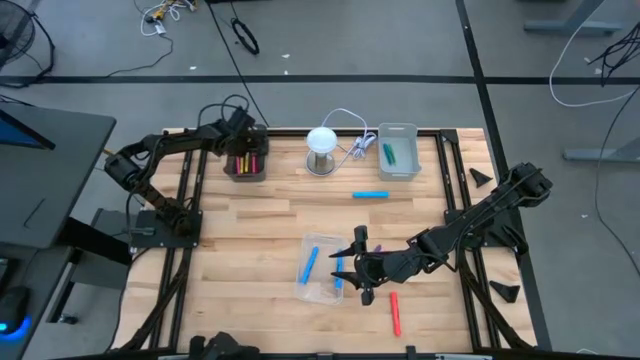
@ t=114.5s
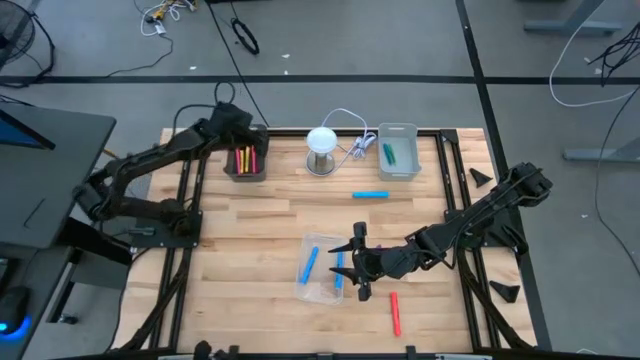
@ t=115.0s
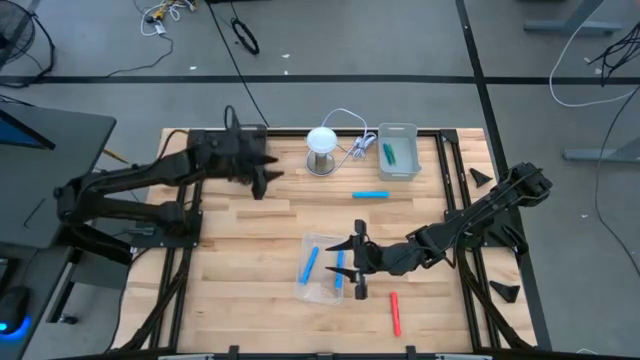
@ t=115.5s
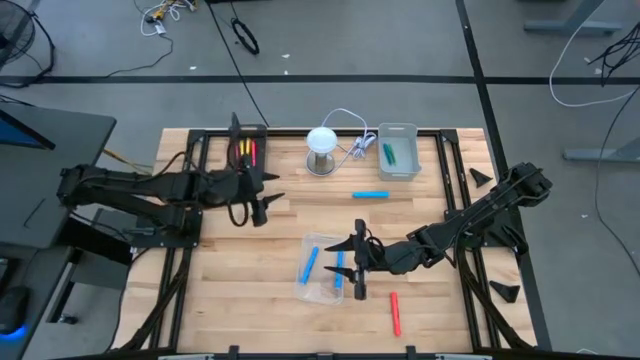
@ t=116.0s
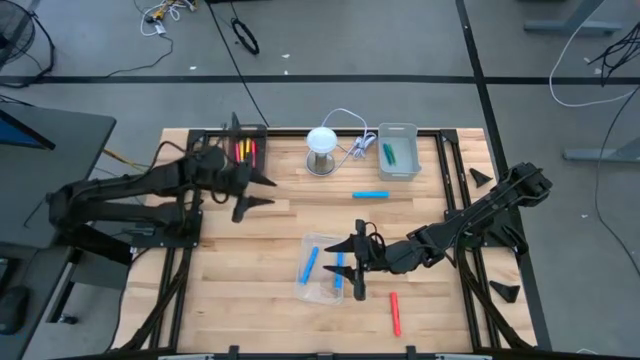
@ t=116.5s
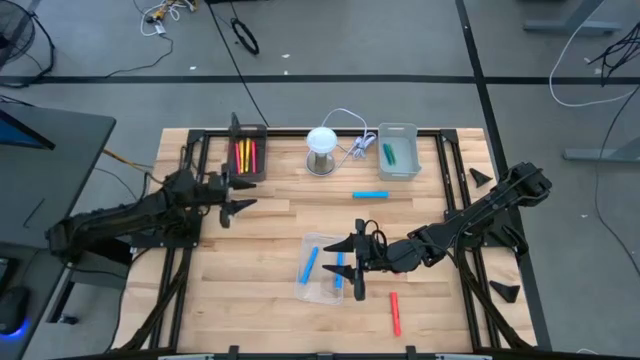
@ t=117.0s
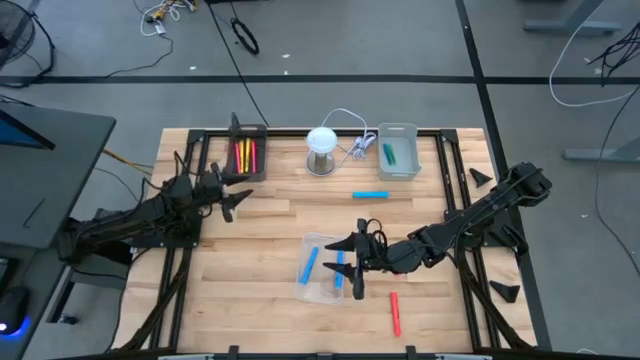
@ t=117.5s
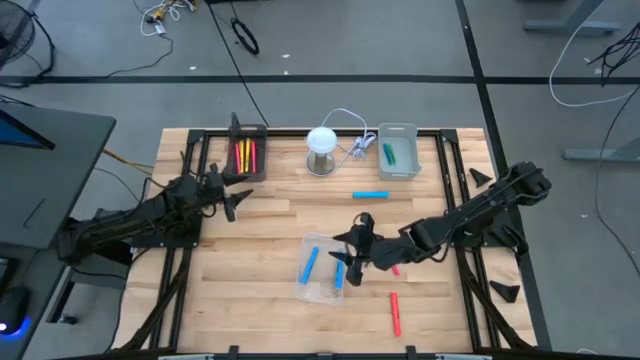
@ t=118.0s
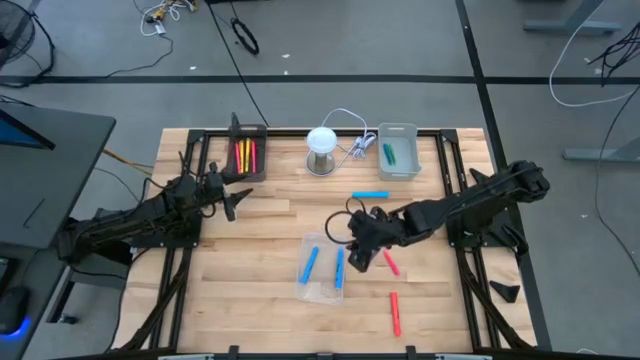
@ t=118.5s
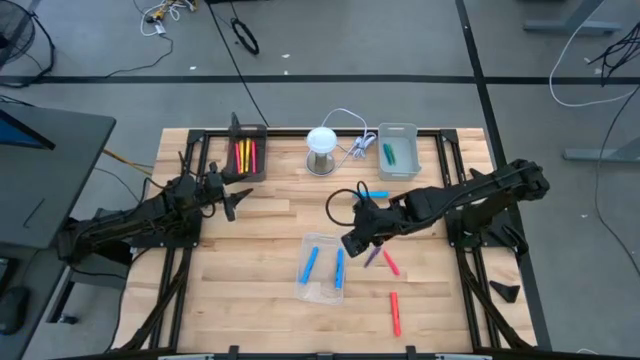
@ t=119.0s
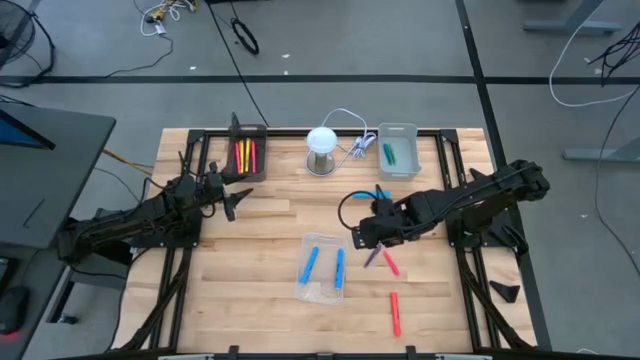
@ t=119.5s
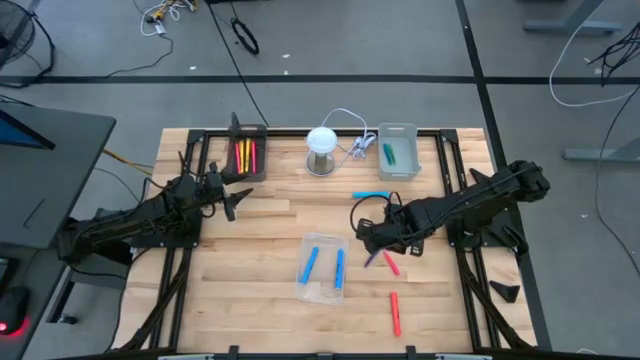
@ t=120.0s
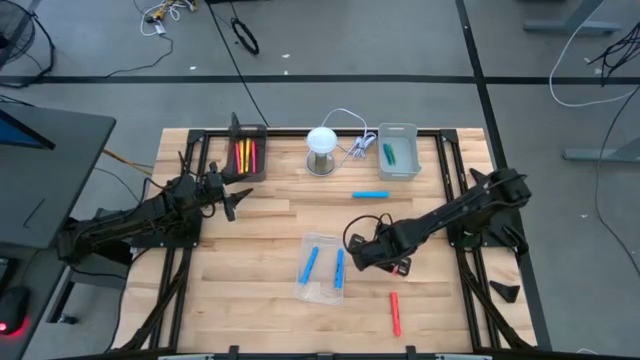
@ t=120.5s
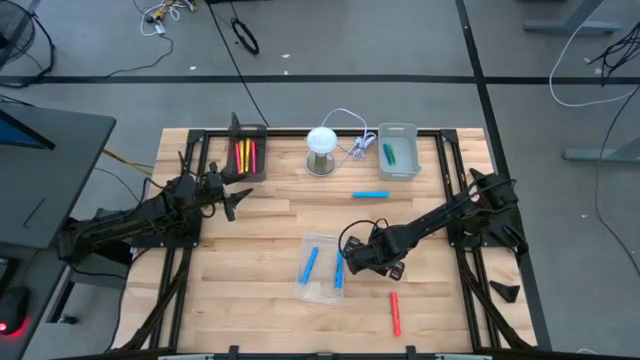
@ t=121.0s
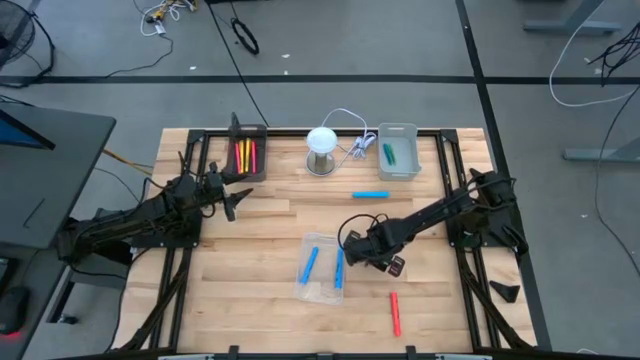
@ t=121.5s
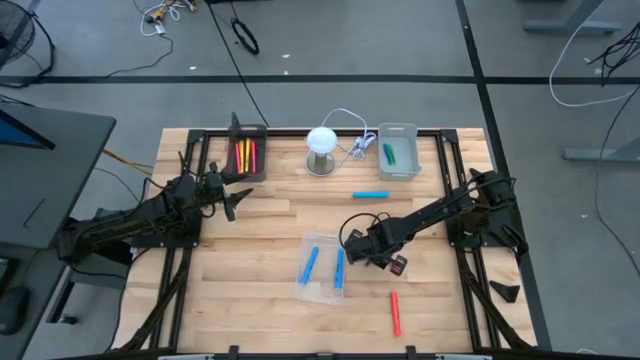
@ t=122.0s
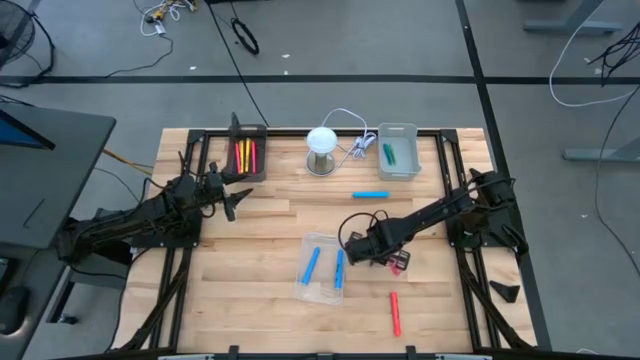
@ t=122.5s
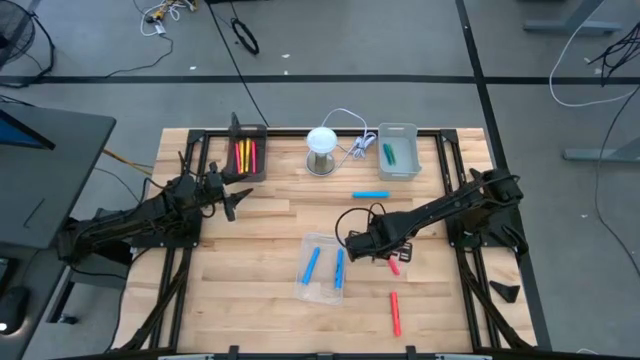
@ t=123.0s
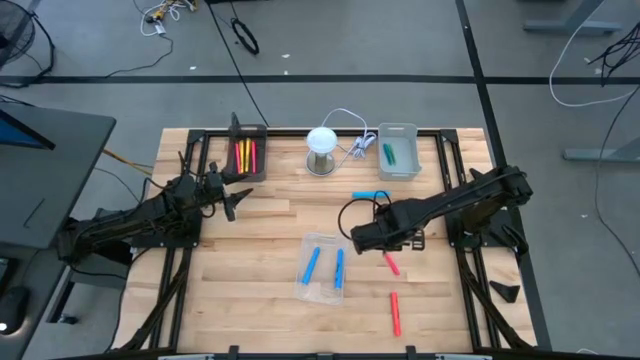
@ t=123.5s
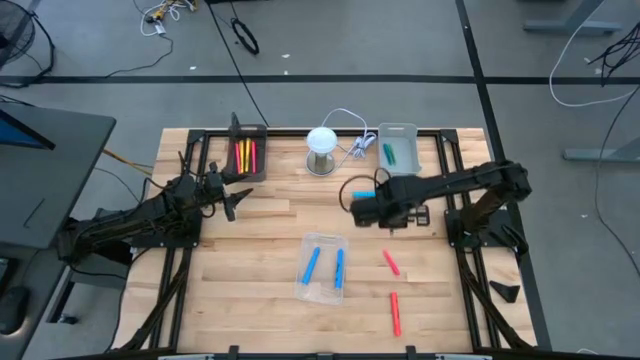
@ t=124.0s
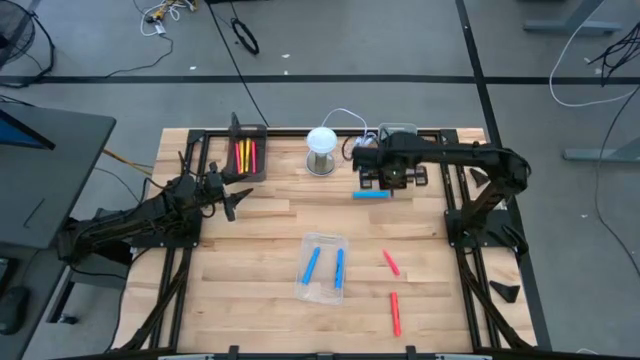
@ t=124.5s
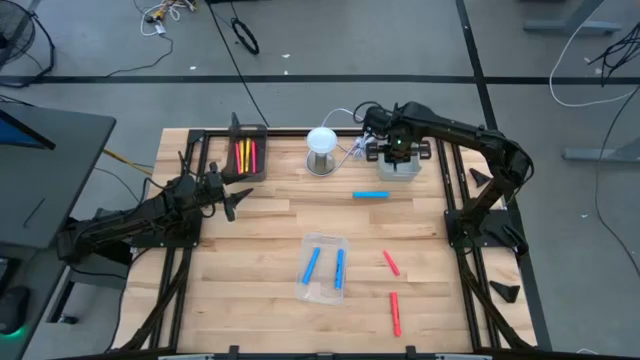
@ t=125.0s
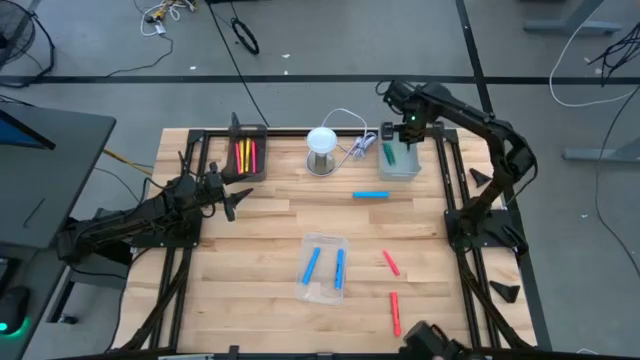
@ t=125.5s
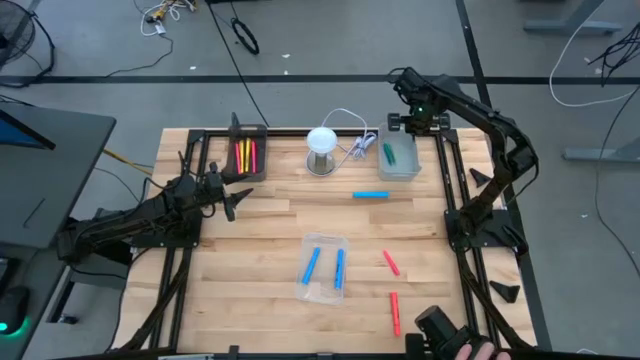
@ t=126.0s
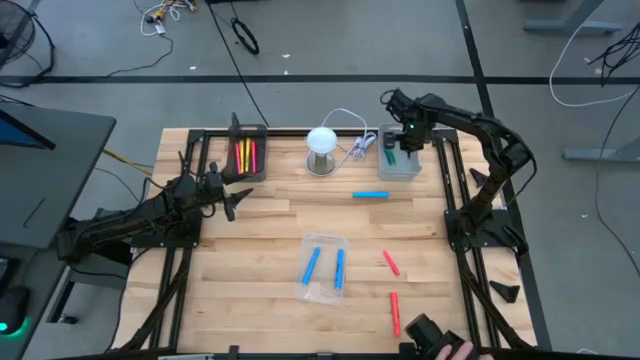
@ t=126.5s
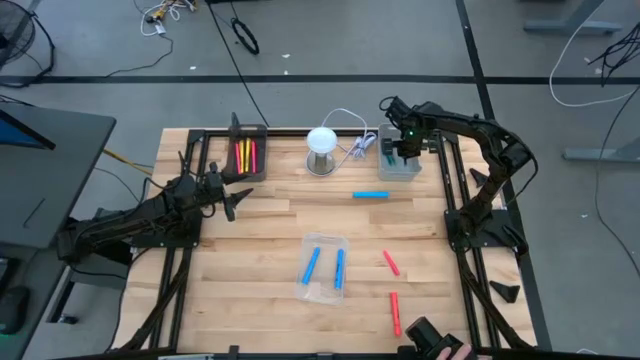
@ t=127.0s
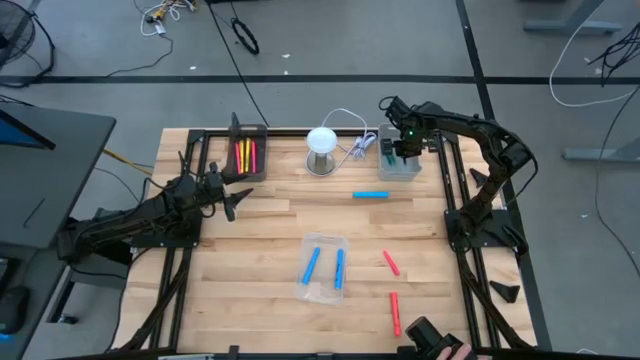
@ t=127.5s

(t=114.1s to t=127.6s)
Task: Pick & Place Markers
Put the purple pen into the gray bin

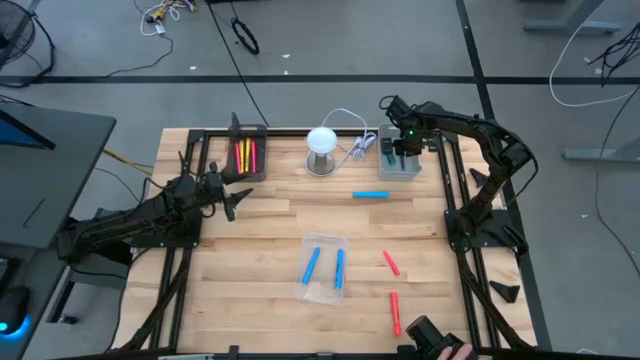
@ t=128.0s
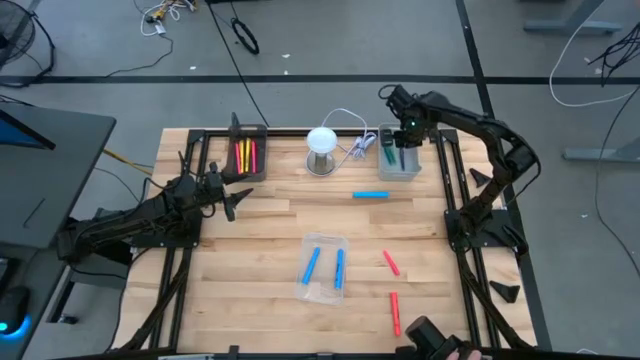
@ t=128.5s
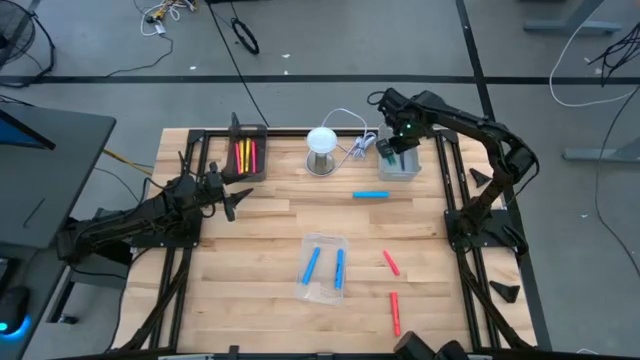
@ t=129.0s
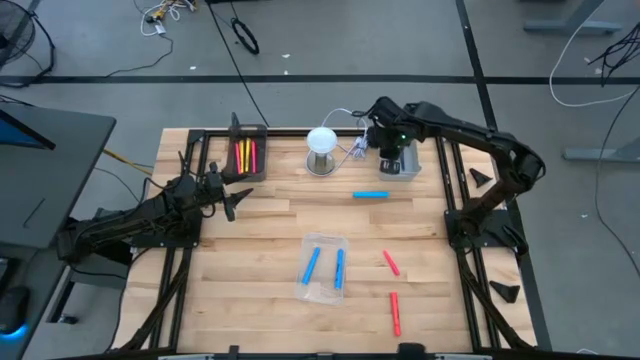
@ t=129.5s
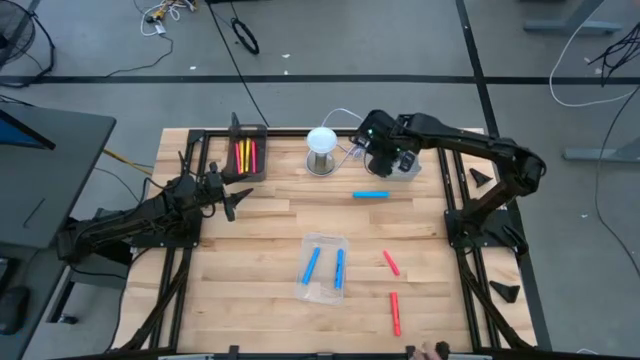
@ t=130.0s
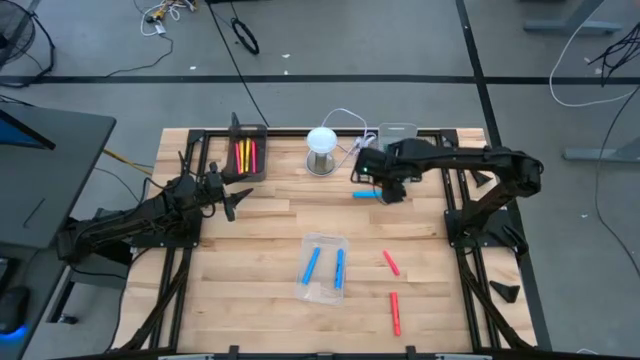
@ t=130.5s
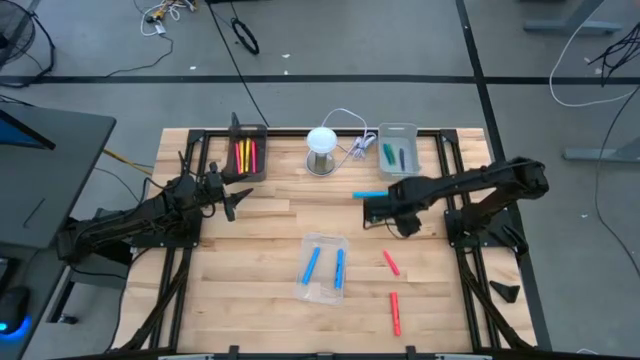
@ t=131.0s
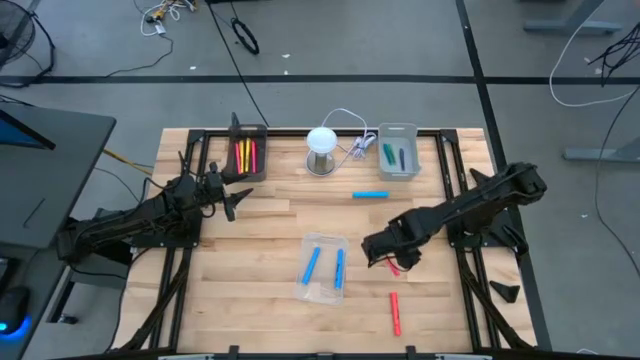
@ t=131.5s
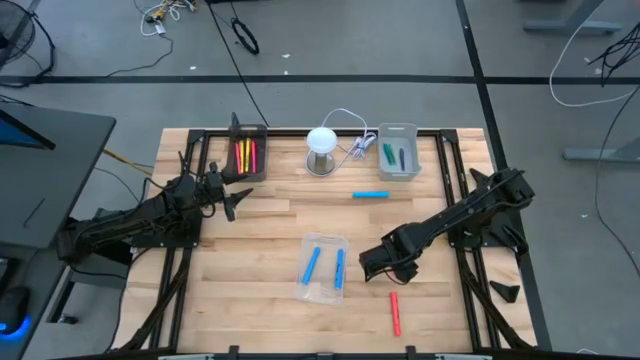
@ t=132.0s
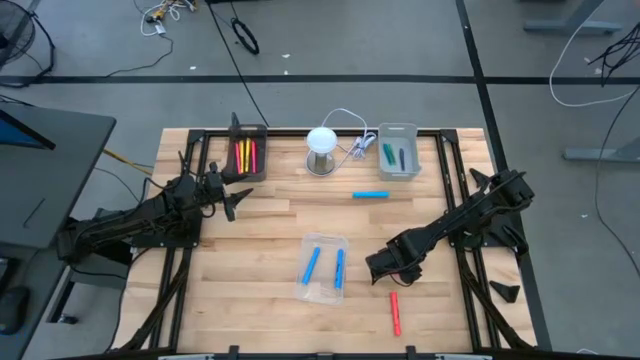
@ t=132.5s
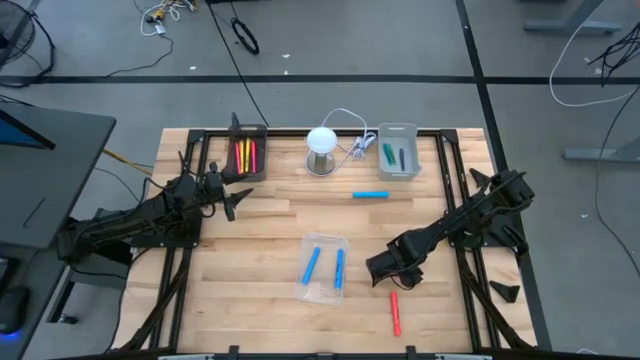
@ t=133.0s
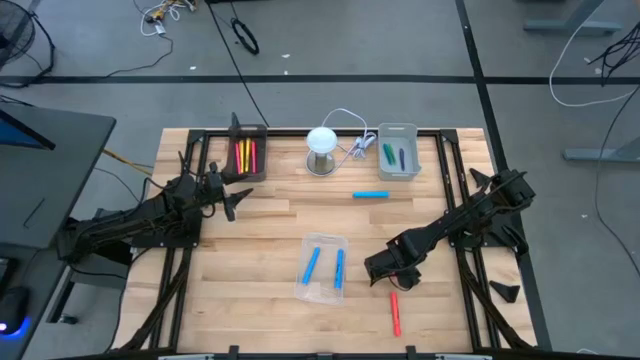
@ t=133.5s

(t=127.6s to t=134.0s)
Put the pink pen into the gray bin
